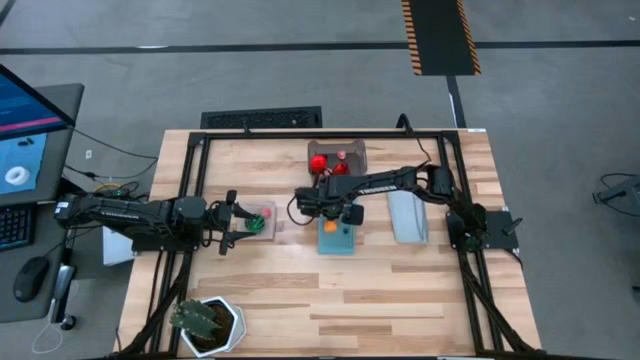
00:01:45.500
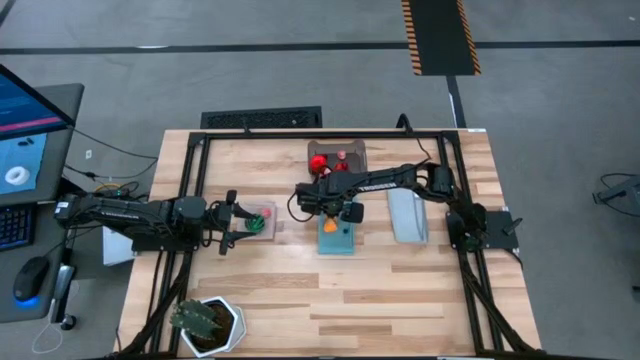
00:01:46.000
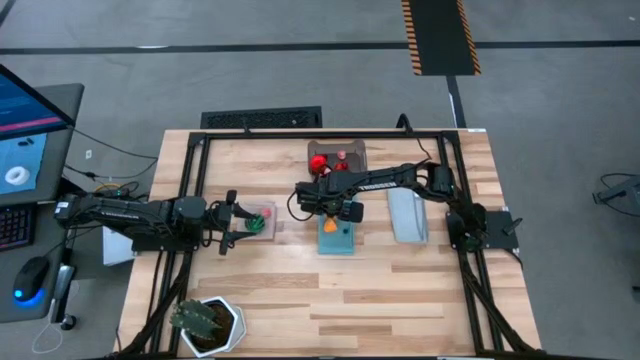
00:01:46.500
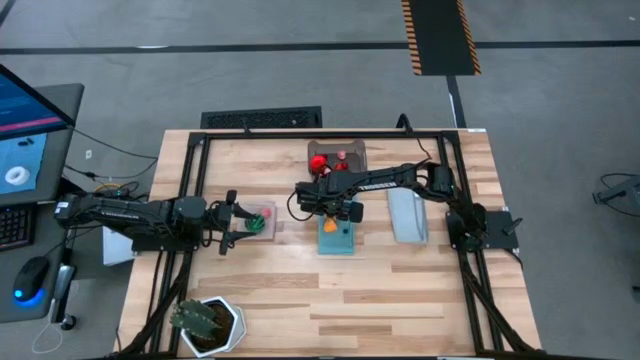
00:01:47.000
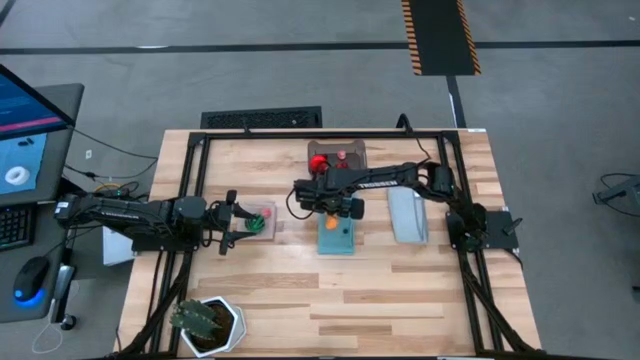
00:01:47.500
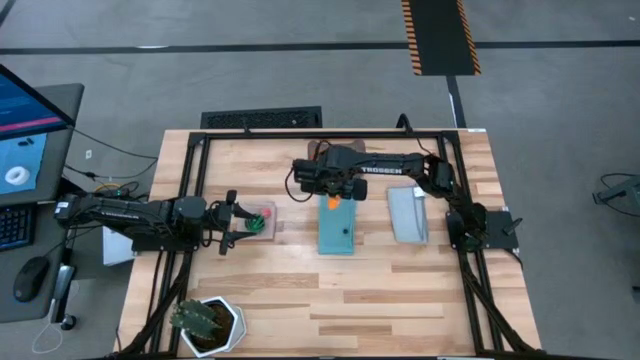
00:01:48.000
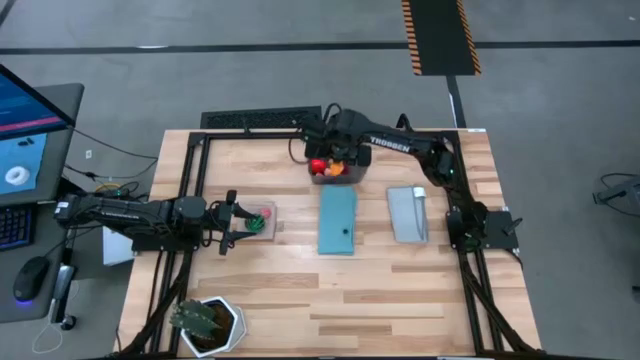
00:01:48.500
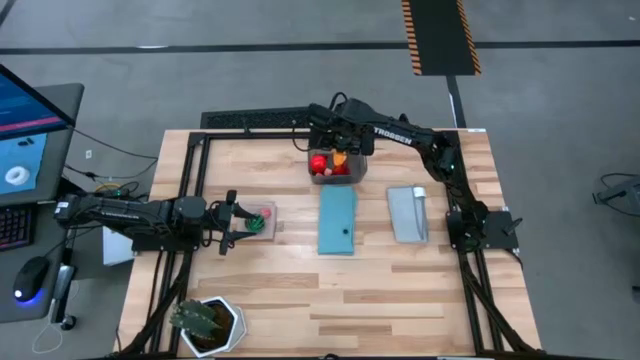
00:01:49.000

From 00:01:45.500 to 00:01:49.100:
Task: Pick and placing Produce into tupperware
Put the yellow croissant into the gray bin

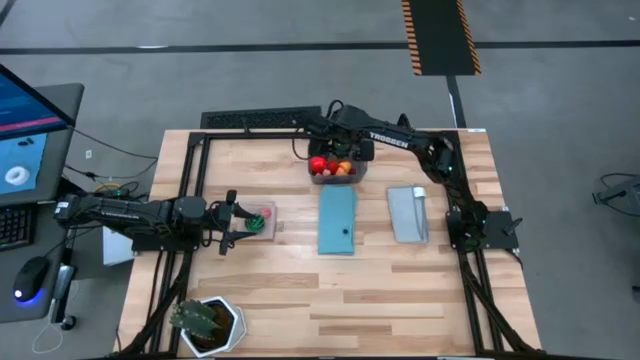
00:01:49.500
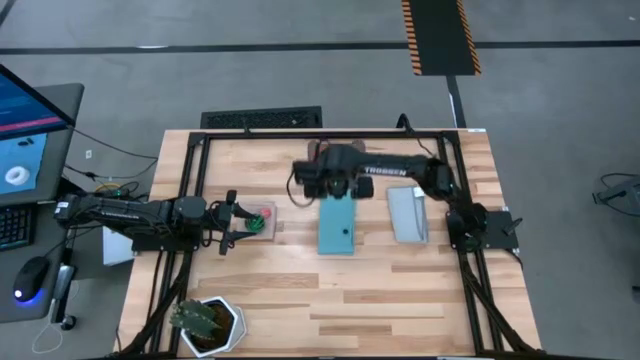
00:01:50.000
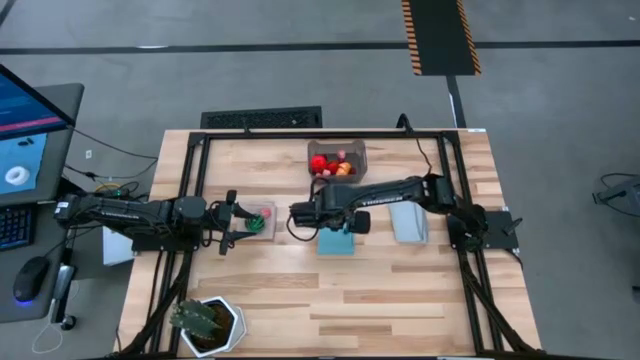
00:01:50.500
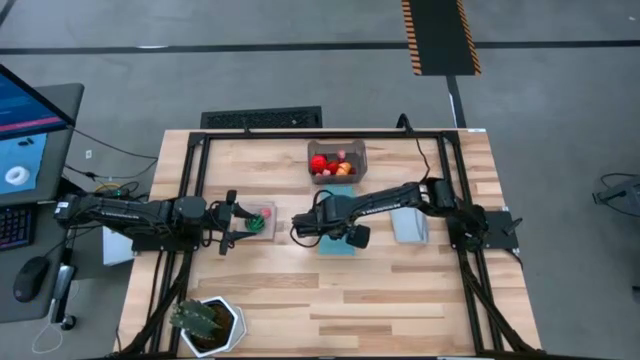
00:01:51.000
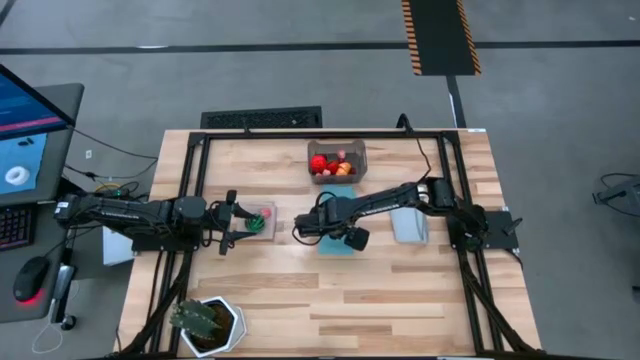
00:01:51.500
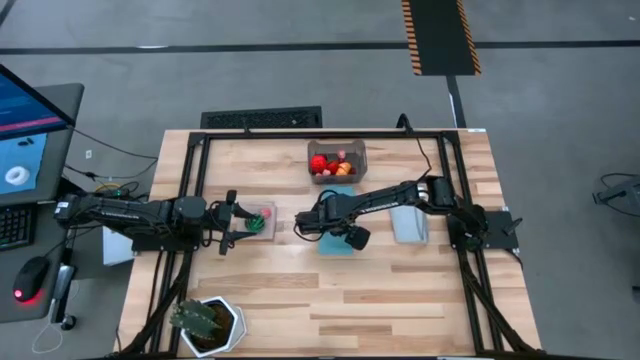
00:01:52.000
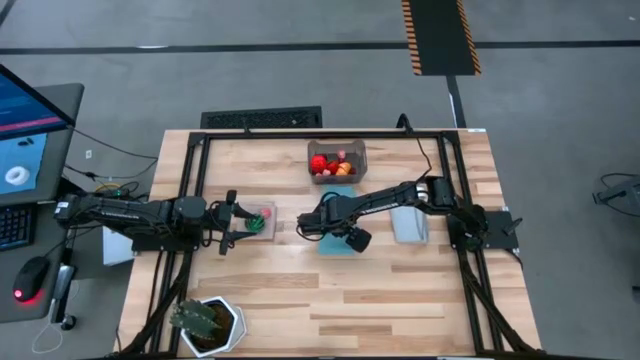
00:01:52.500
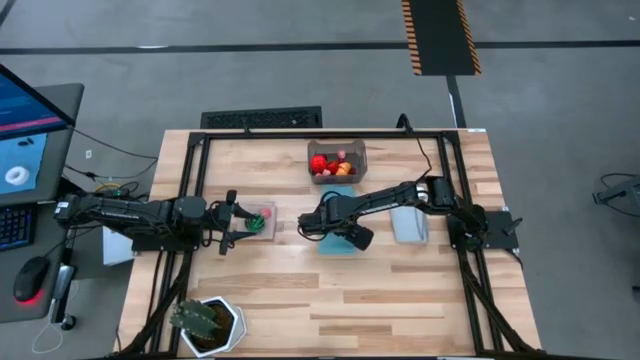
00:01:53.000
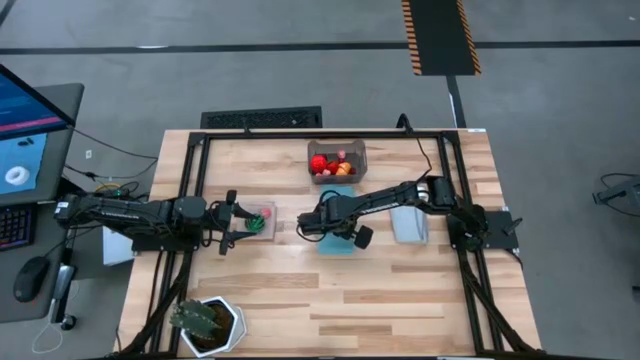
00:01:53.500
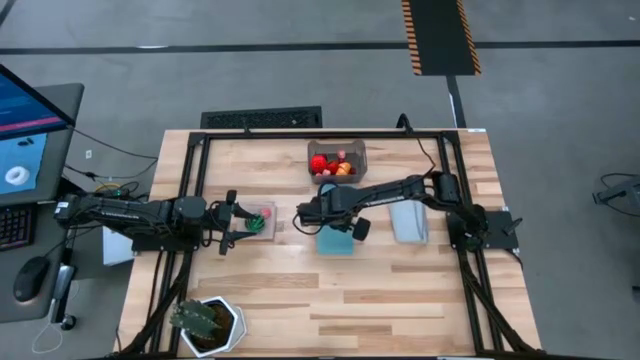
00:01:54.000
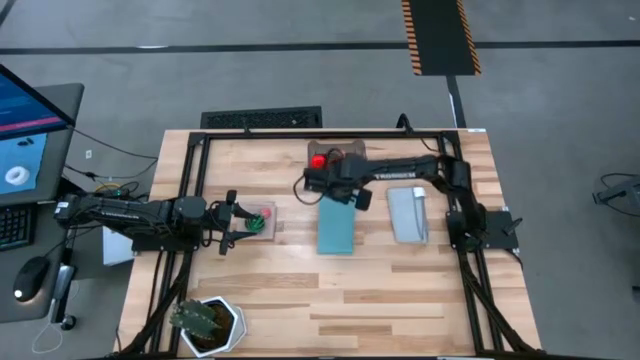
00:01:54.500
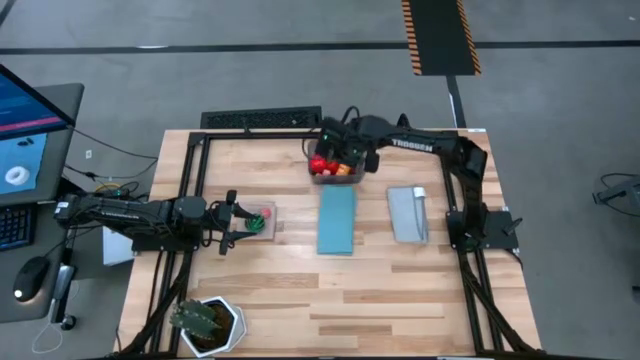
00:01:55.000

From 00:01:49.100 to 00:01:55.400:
Put the blueberry into the gray bin

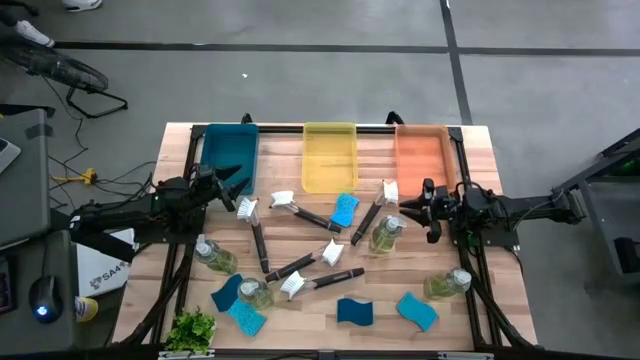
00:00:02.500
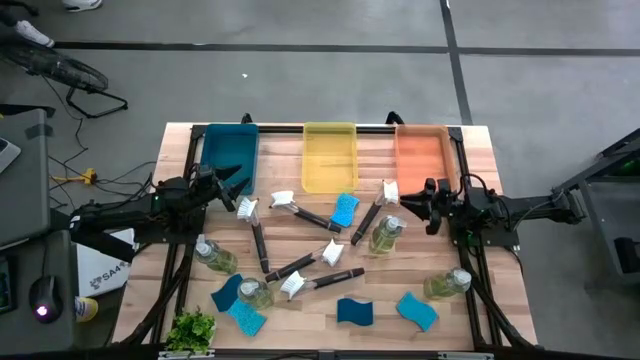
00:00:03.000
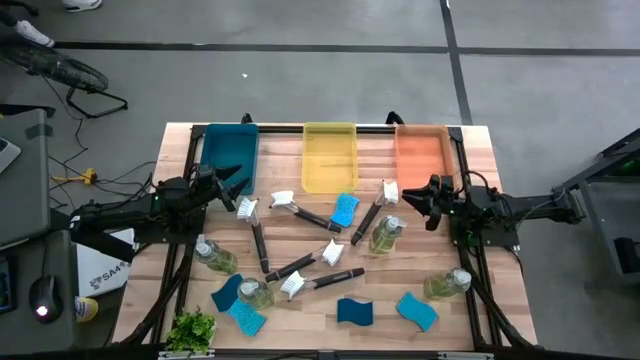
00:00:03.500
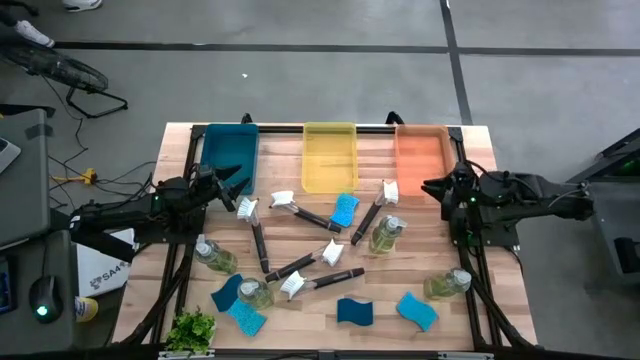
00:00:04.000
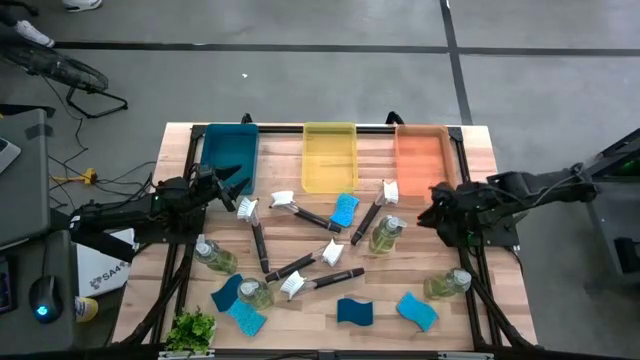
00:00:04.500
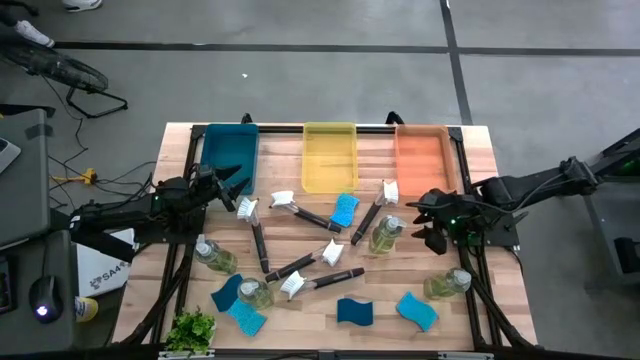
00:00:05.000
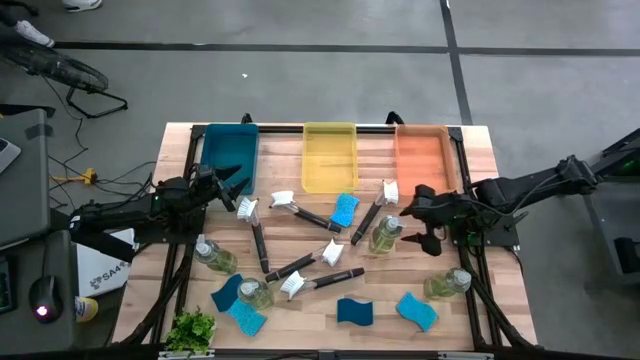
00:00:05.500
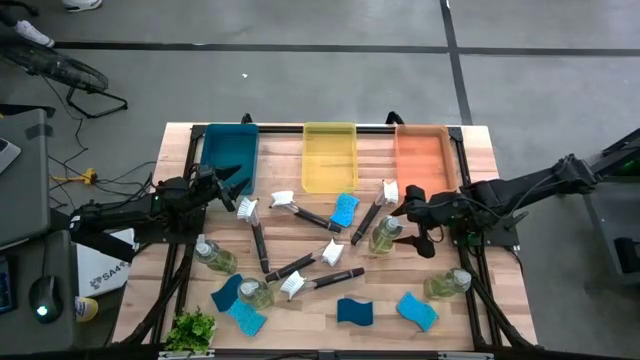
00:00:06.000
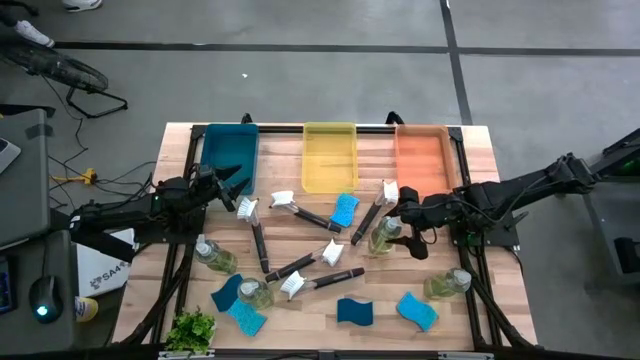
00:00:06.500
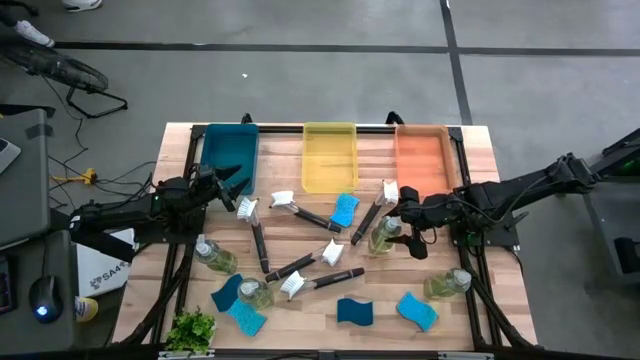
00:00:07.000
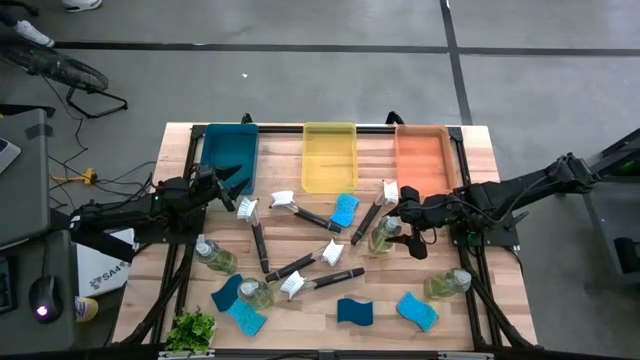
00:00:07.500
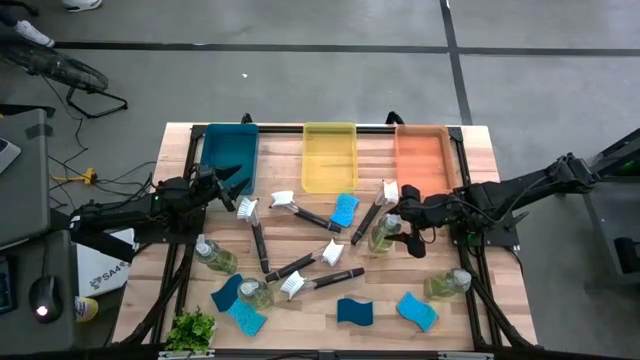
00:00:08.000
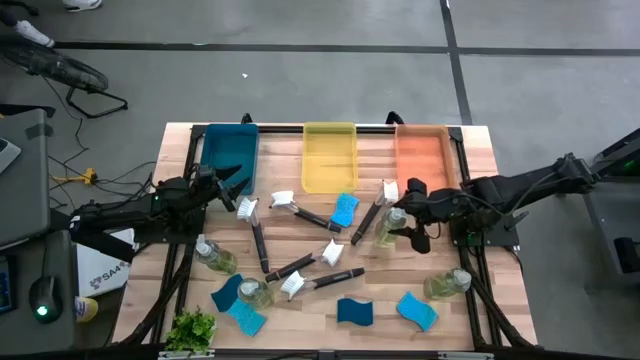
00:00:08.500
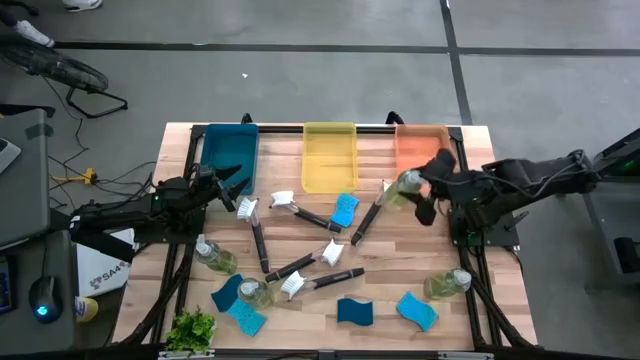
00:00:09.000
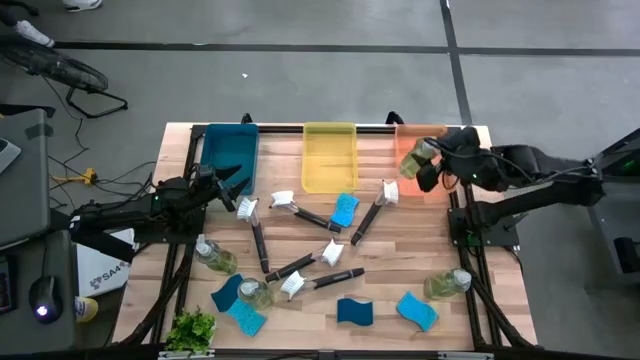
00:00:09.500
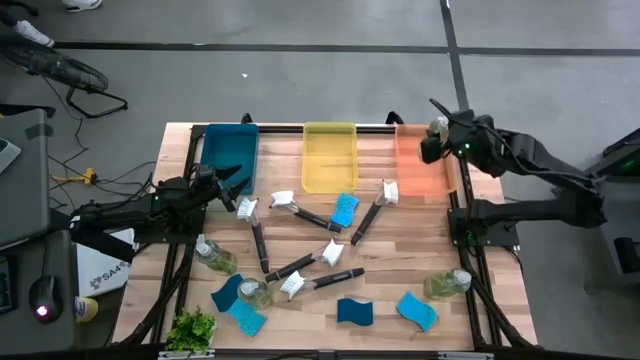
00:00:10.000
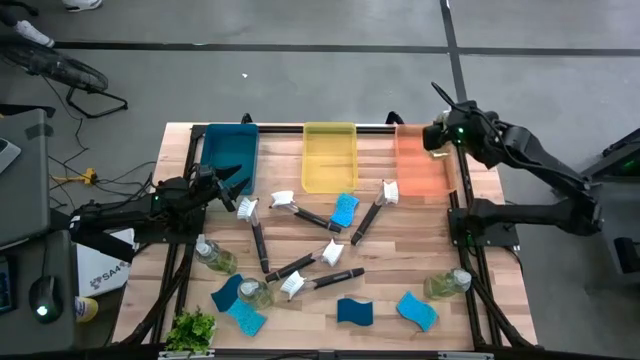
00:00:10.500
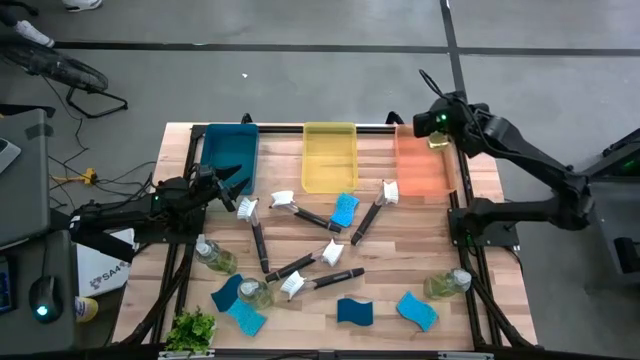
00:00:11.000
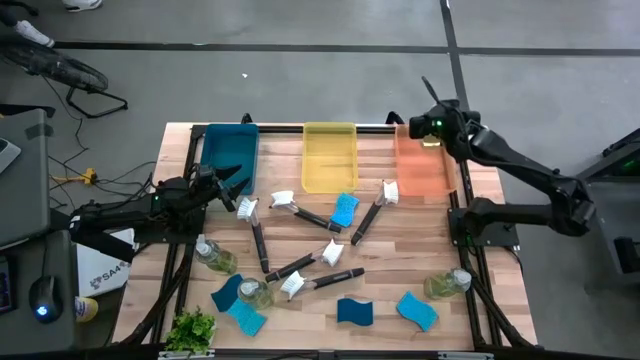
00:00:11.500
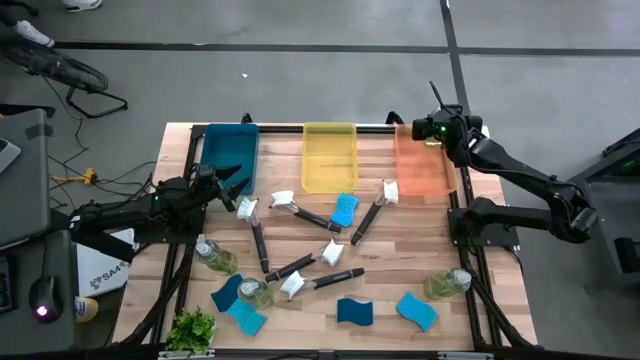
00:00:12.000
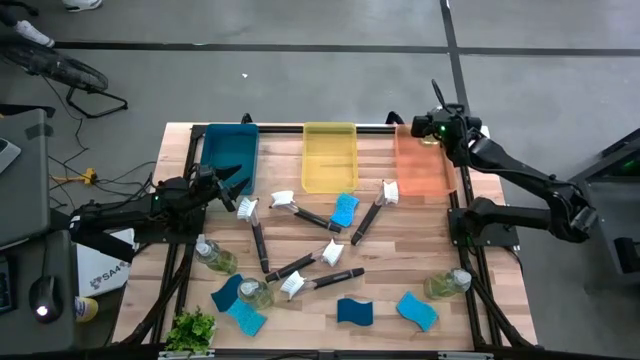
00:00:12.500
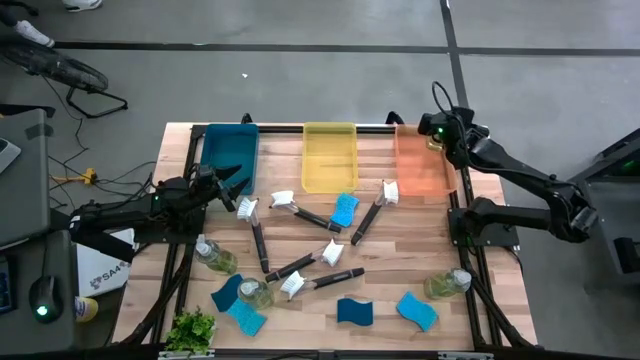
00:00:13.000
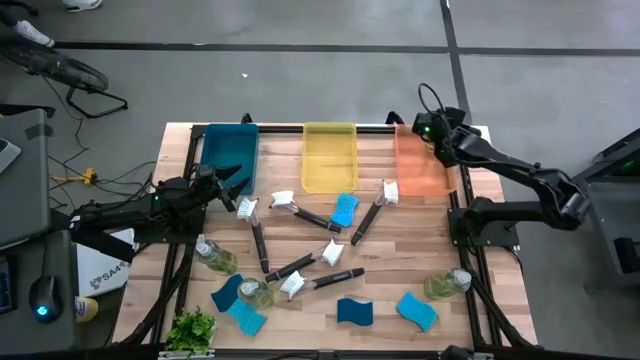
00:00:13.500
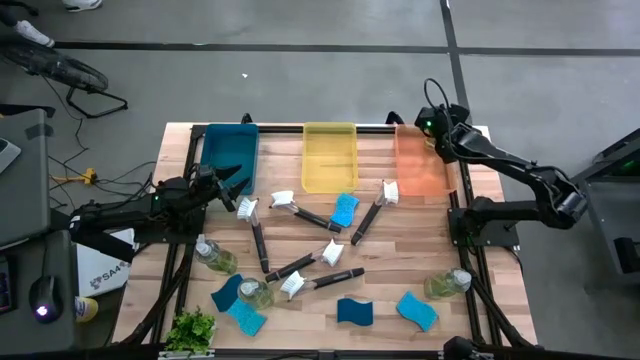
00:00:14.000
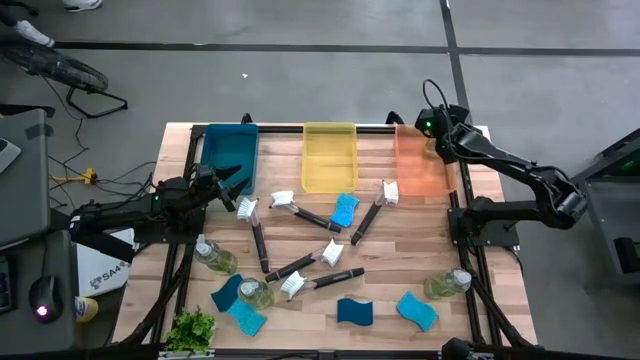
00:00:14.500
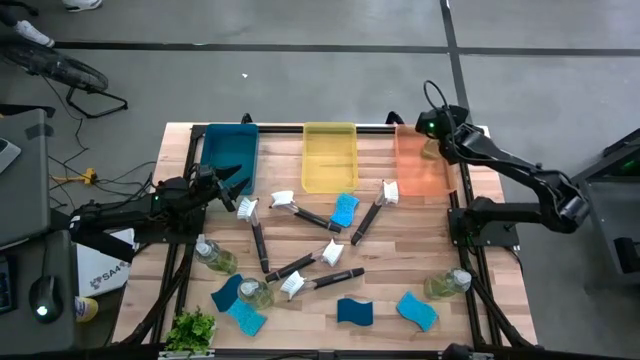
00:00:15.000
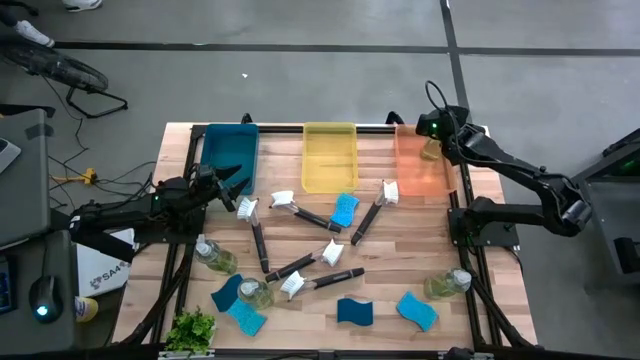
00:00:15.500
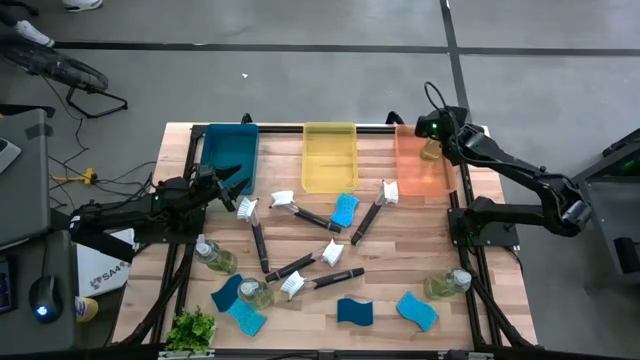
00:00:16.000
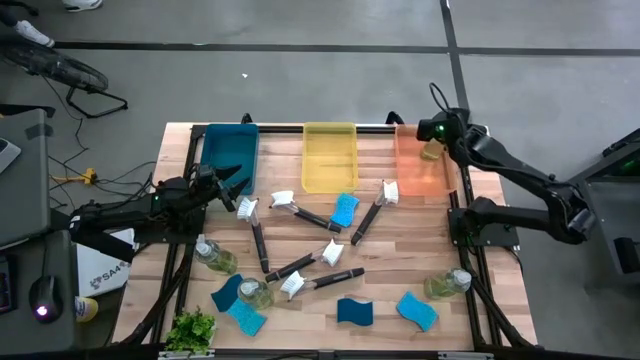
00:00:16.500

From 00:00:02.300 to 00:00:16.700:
Task: Pick & Place Kitchen Sink Supplies
Put the green dishwashing liquid dispenser into the orange bin
